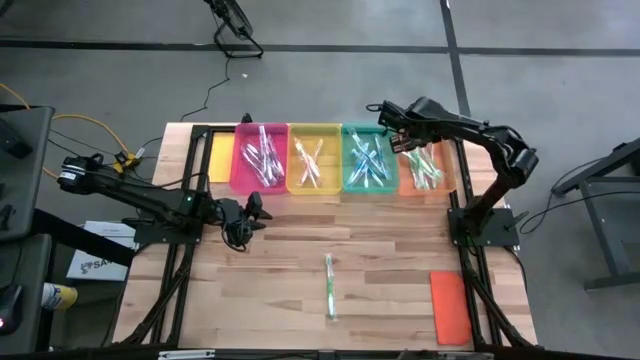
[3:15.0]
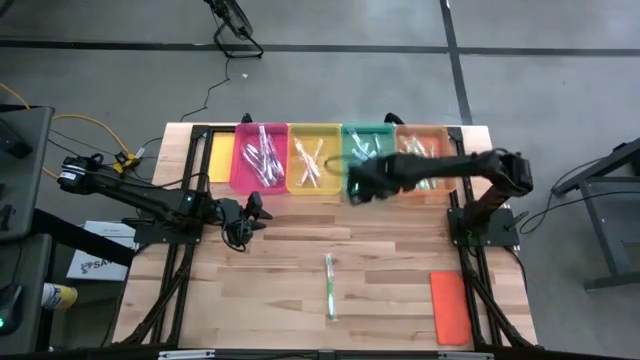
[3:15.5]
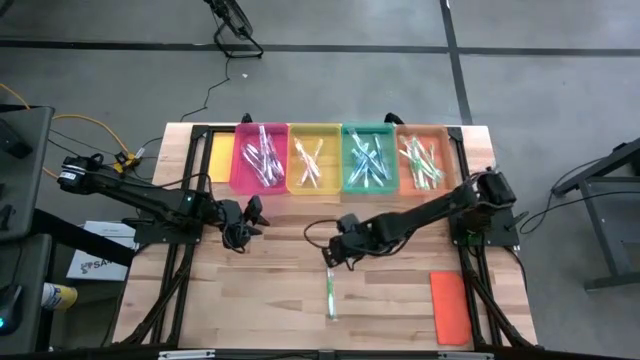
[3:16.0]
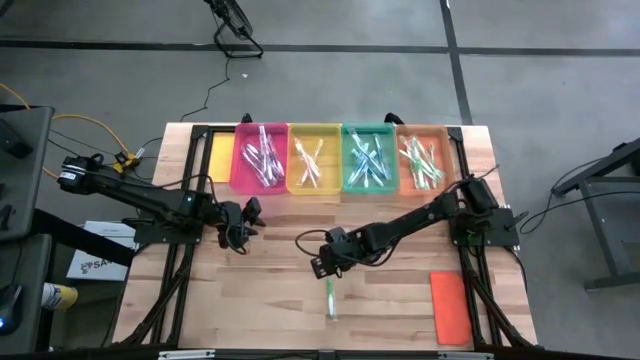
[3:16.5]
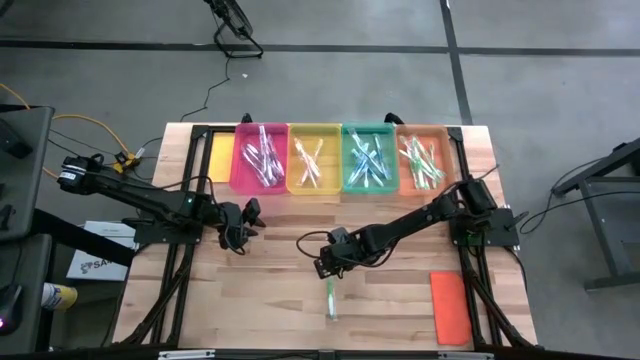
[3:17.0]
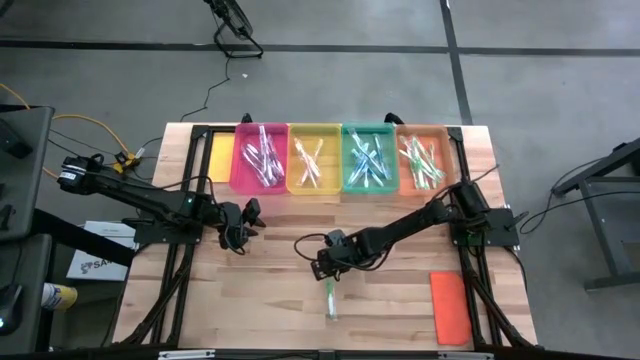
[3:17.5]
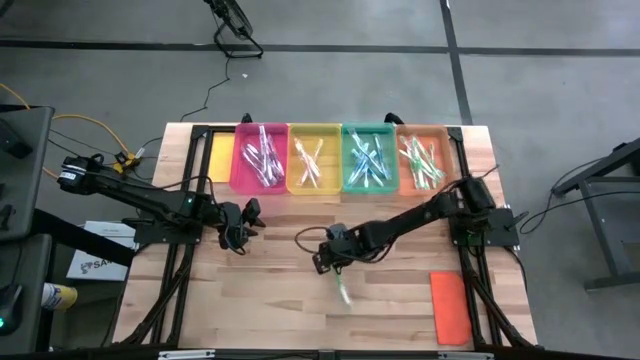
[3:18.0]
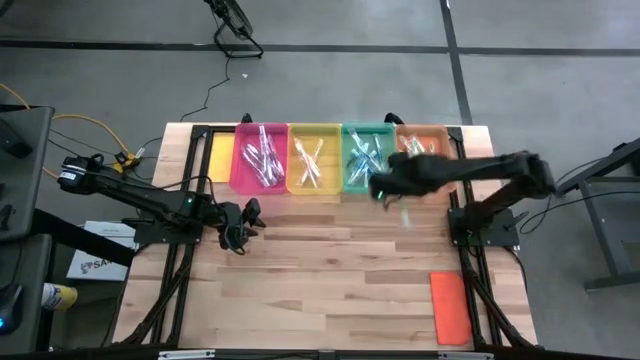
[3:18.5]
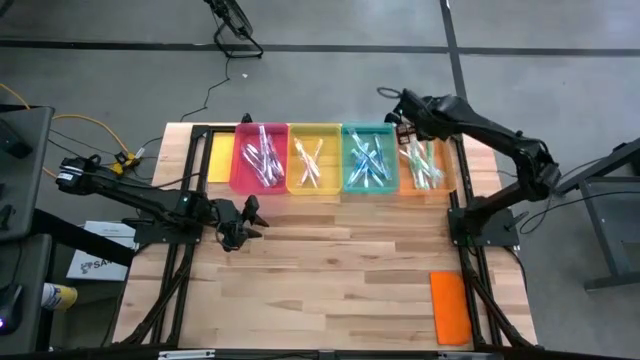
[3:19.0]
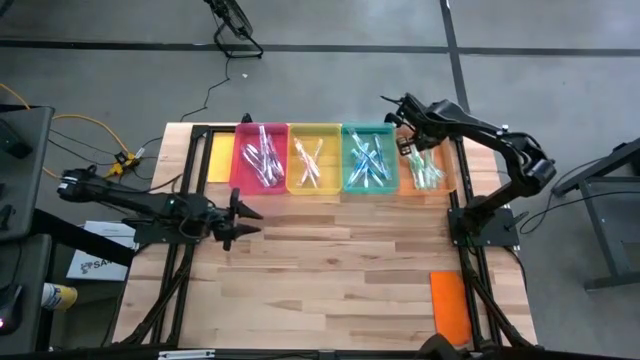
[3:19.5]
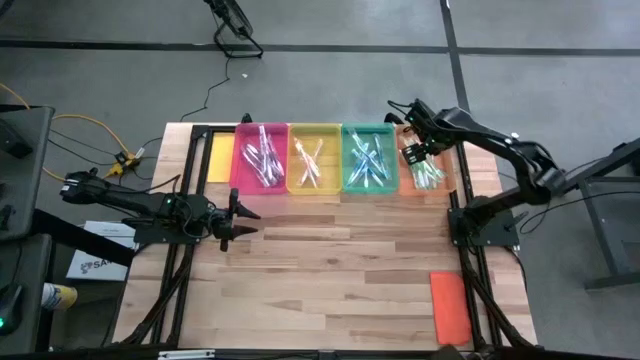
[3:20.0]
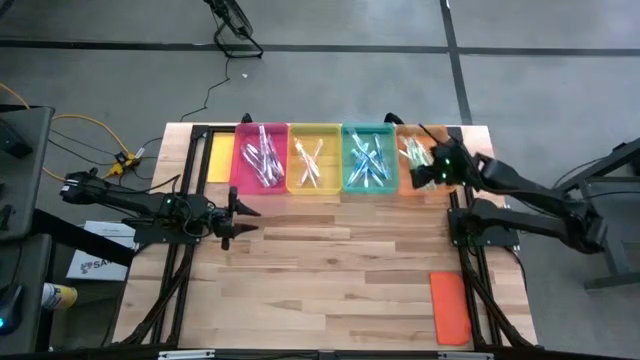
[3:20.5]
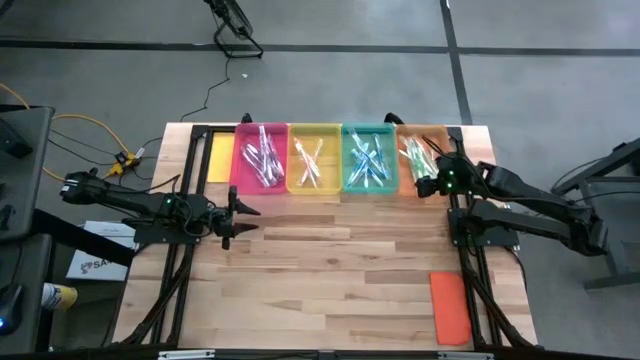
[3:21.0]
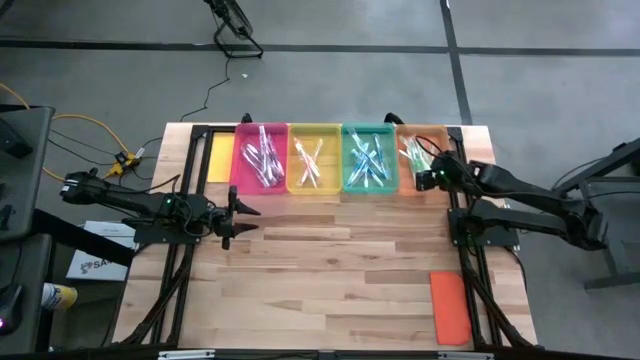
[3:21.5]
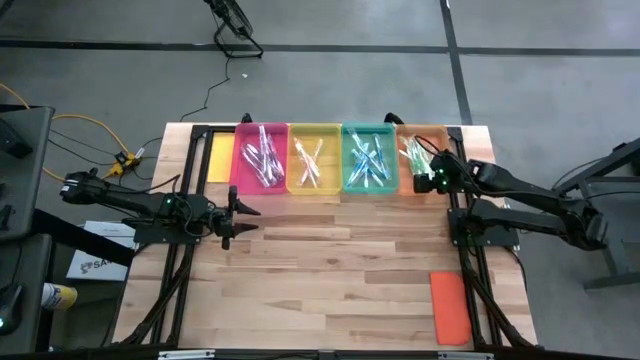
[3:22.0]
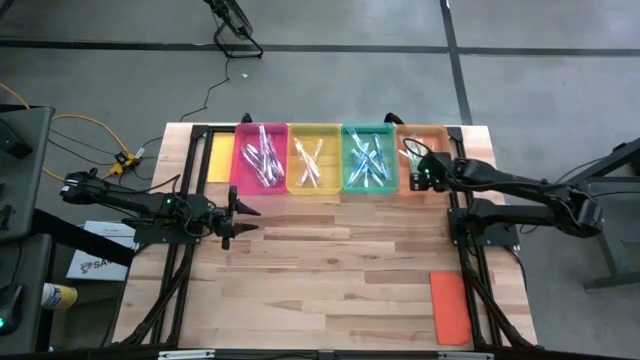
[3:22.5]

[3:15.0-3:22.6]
Task: Pick & Place Toothbrushes
Put the green toothbrush into the orange bin

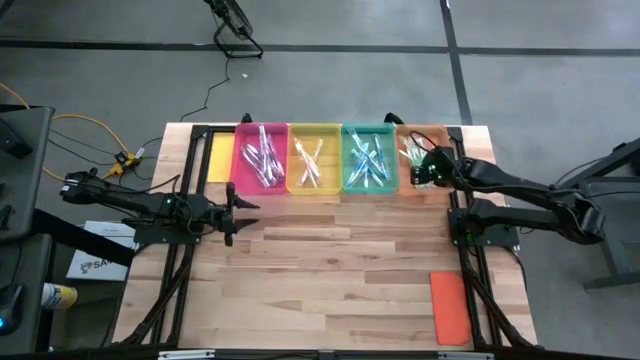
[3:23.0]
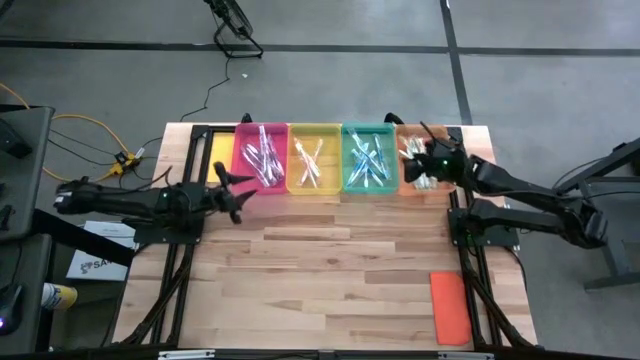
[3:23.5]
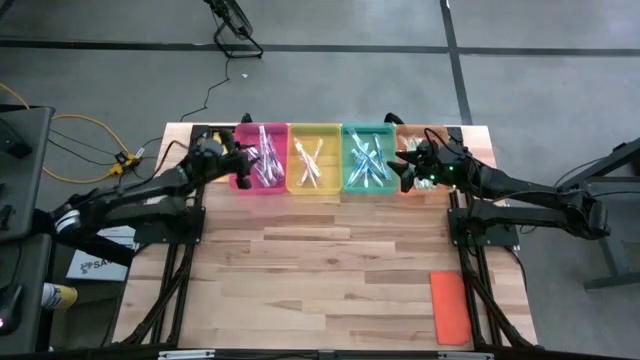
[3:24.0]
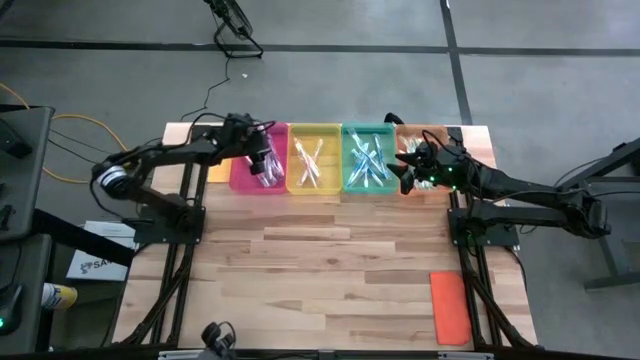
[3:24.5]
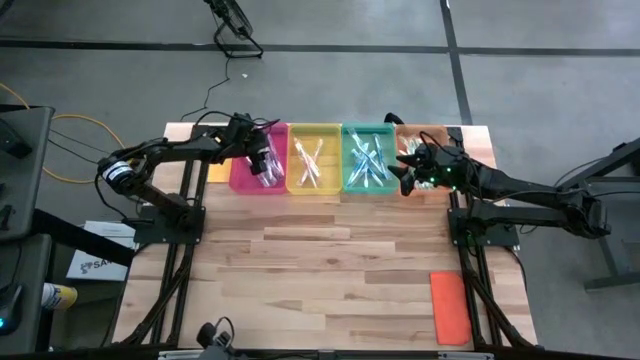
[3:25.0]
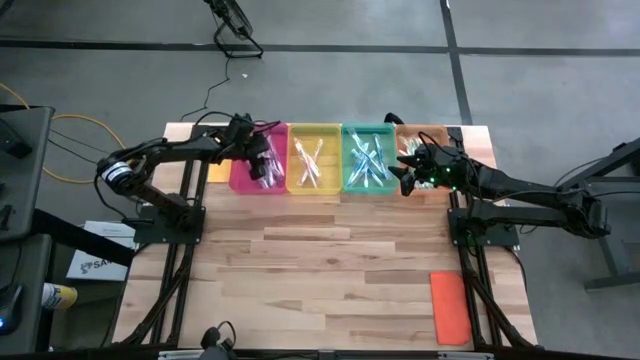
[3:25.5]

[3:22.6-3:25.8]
Adjust the purple toothbrush in the pink bin

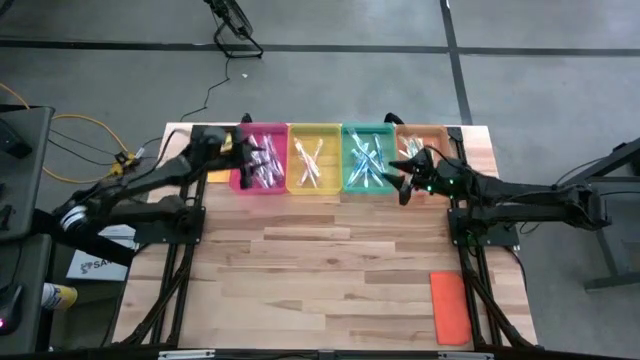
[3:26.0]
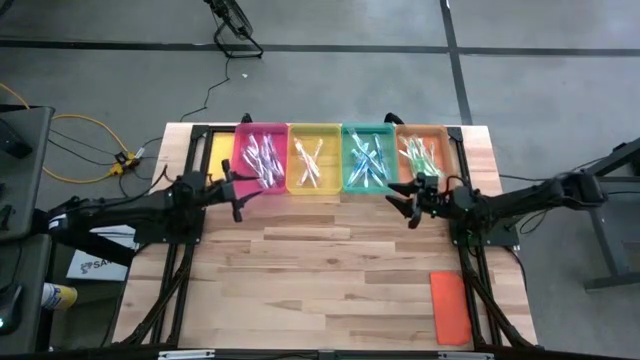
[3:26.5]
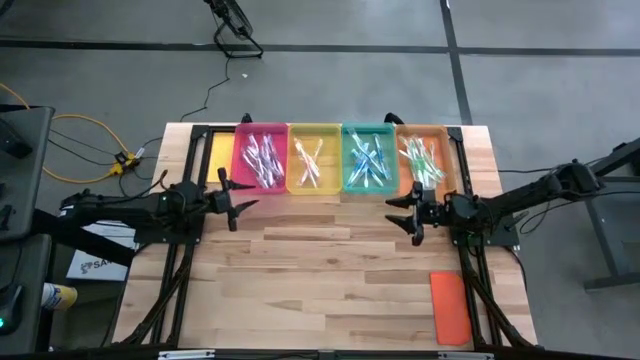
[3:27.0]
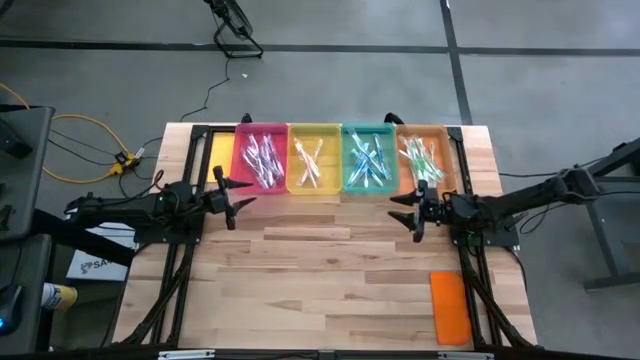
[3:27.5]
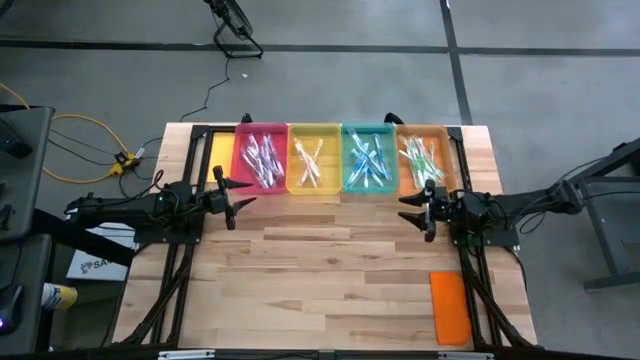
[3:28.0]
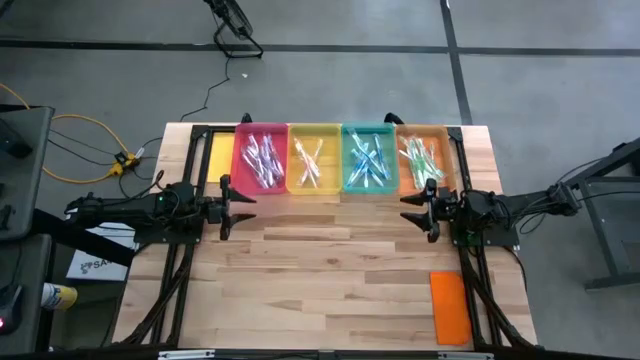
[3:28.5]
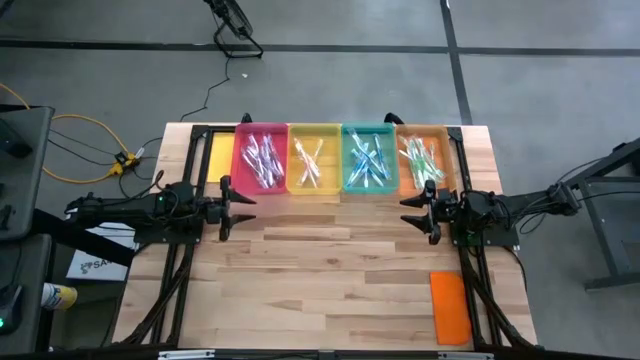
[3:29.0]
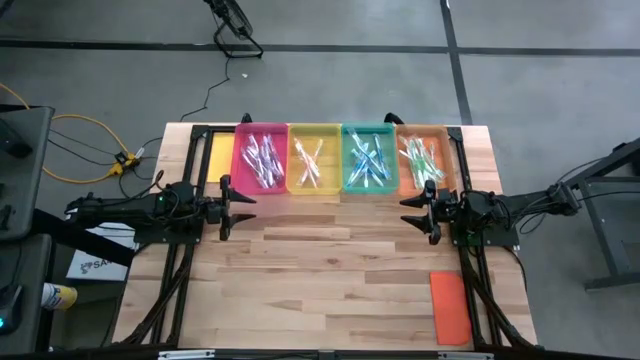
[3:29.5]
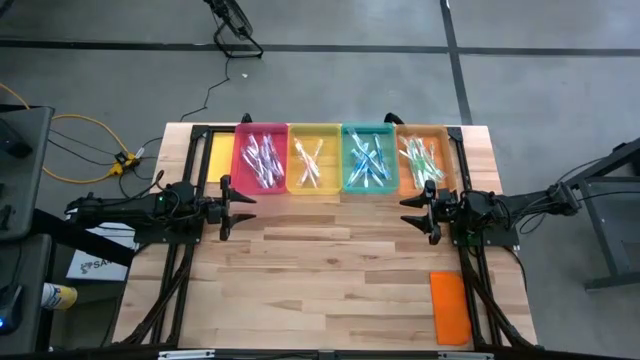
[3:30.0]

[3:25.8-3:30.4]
Return to Home Position

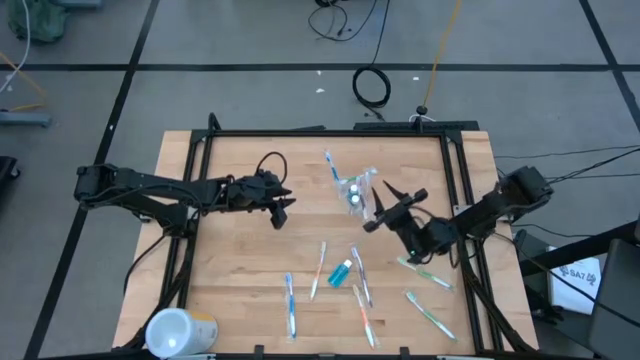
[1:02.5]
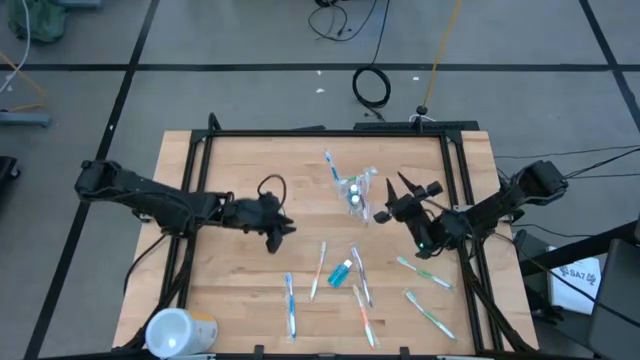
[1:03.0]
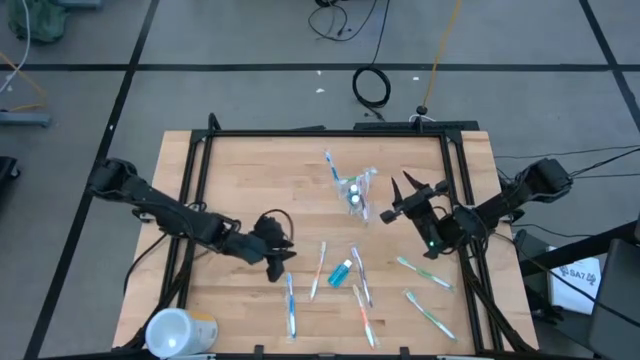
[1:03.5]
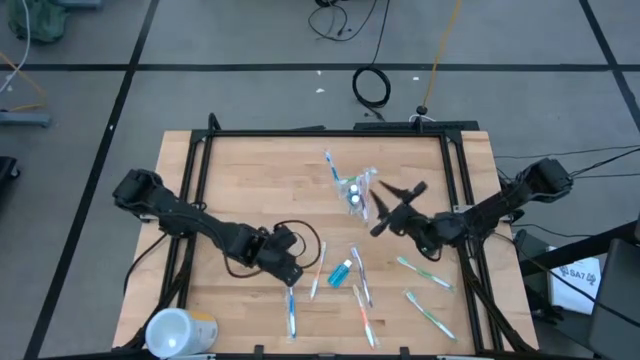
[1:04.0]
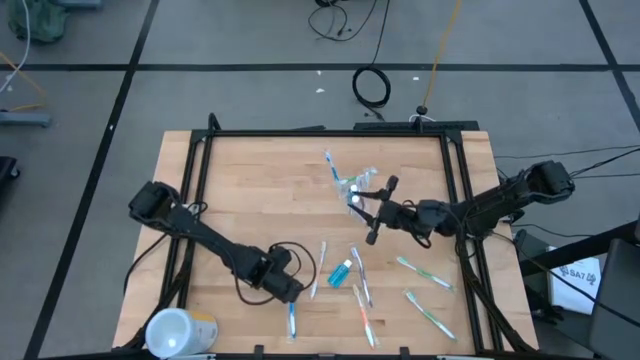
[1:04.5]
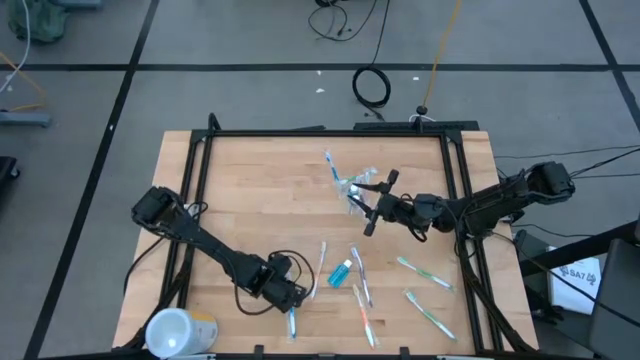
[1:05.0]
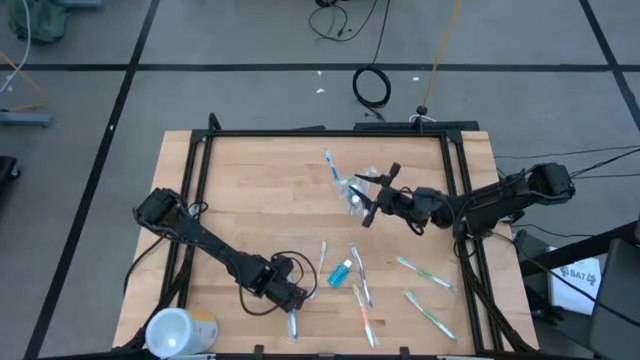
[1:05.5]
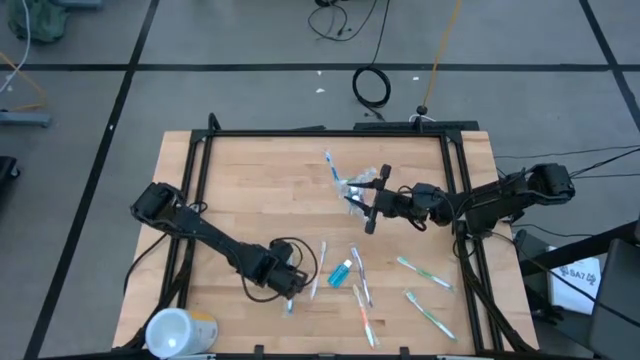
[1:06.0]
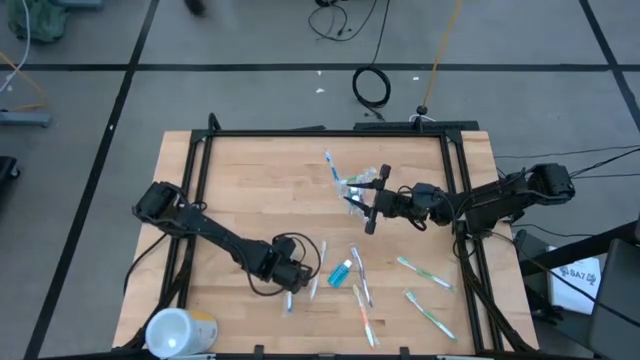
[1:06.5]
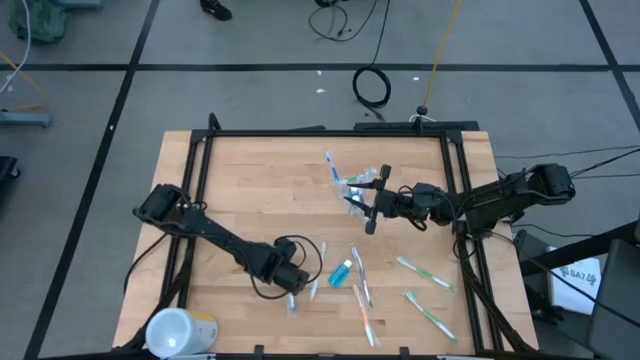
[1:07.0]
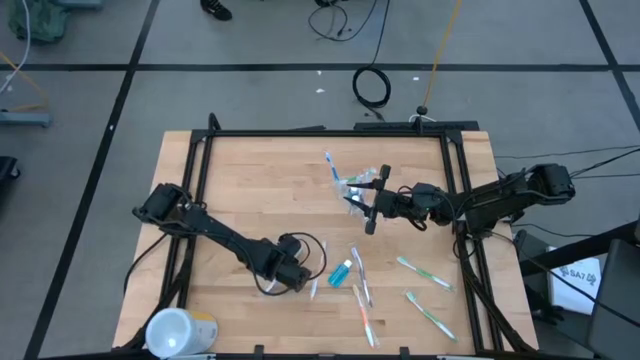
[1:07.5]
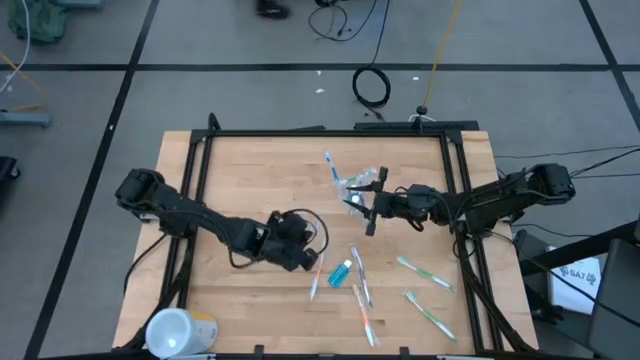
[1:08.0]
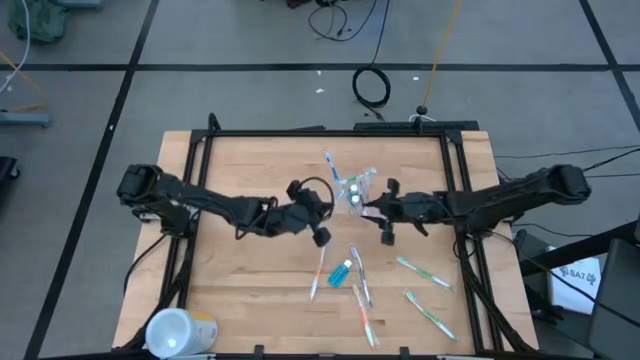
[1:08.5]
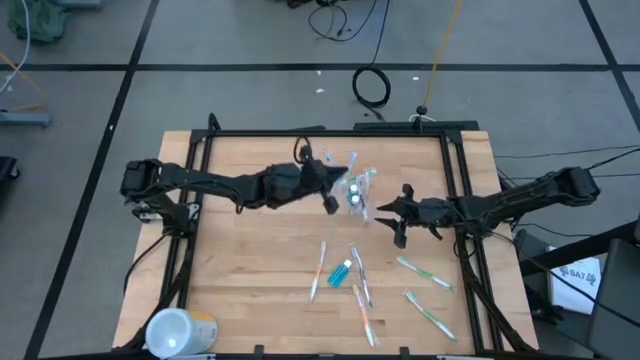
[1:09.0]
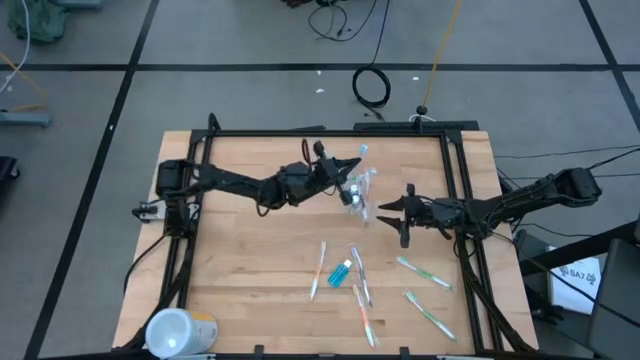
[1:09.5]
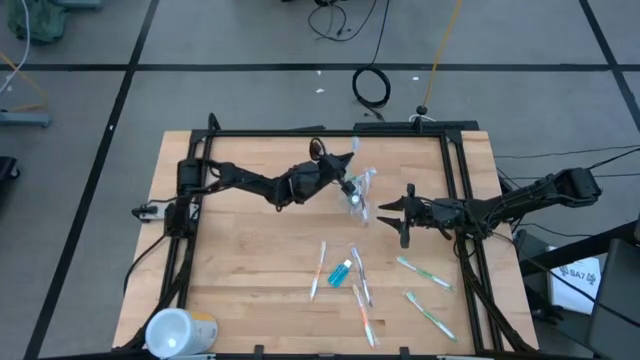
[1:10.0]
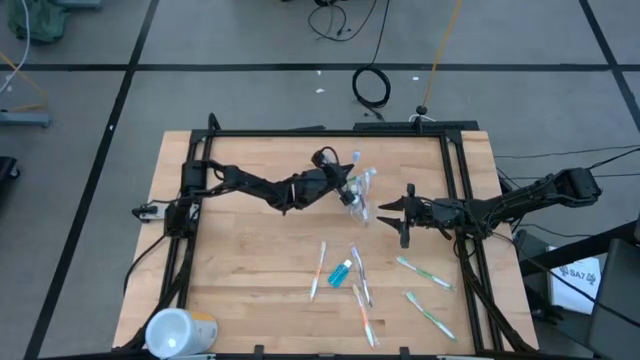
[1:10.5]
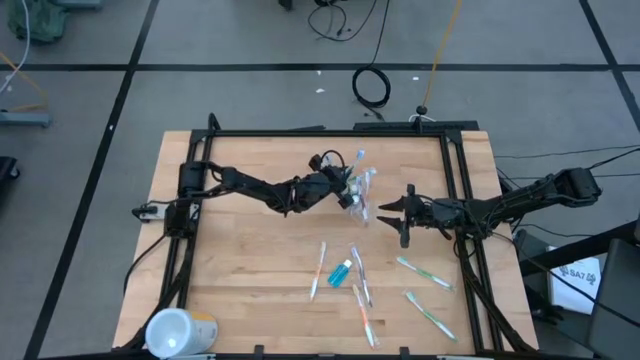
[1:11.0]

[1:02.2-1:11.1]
Task: Pick & Place toothbrushing station
Put the blue toothbrush into the transparent organizer
